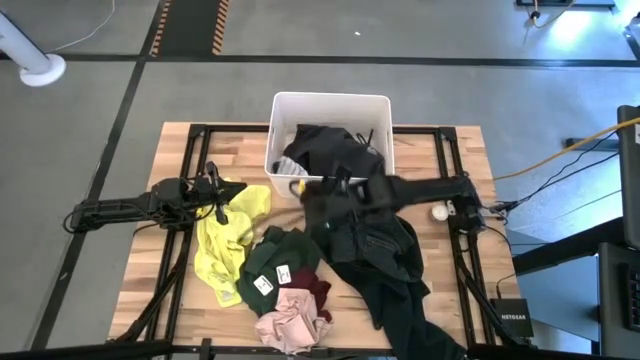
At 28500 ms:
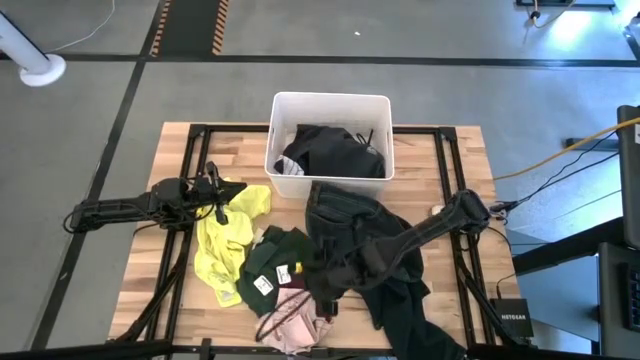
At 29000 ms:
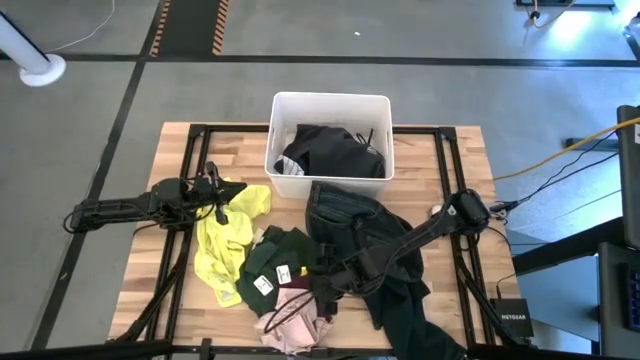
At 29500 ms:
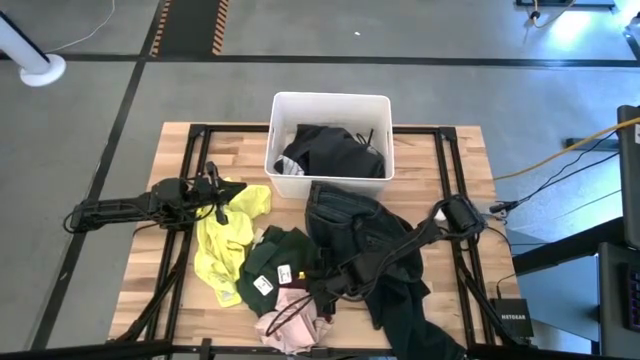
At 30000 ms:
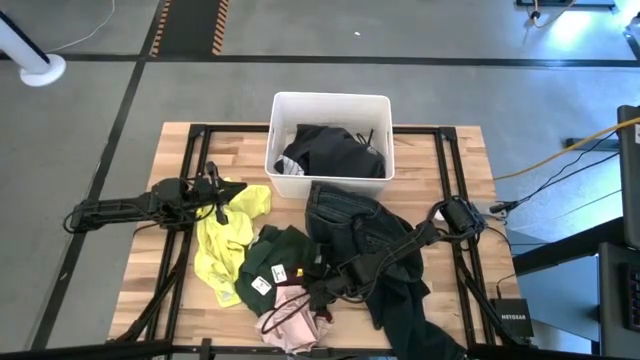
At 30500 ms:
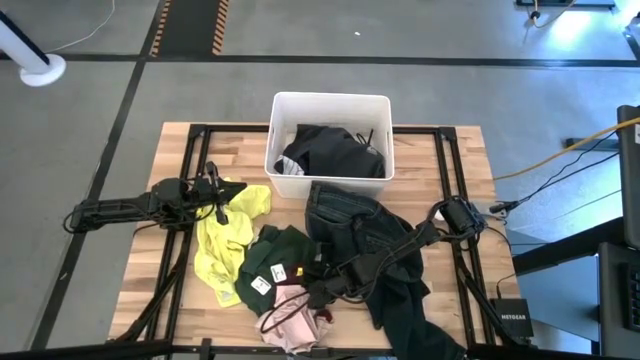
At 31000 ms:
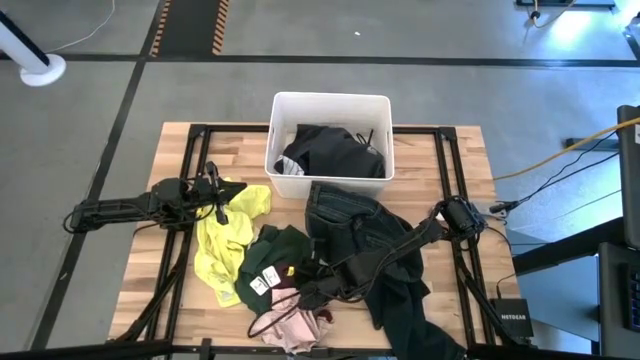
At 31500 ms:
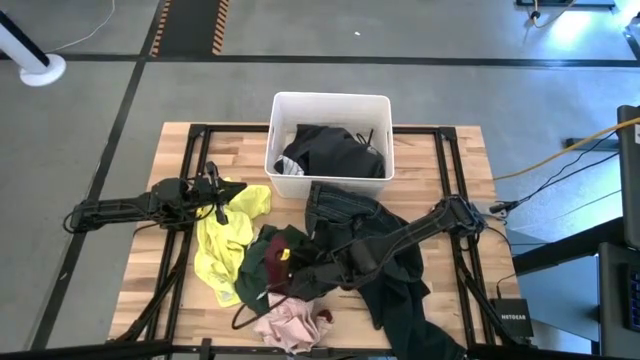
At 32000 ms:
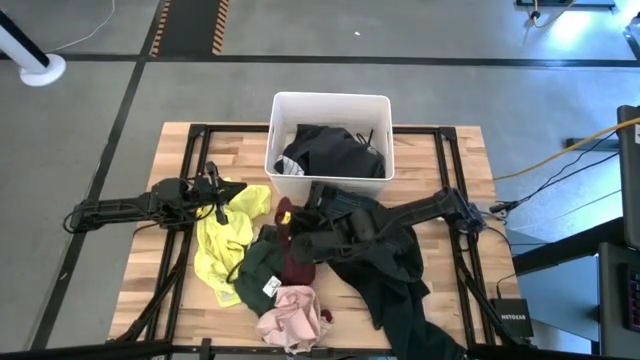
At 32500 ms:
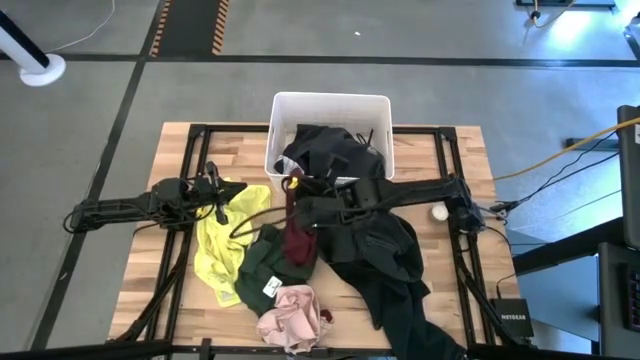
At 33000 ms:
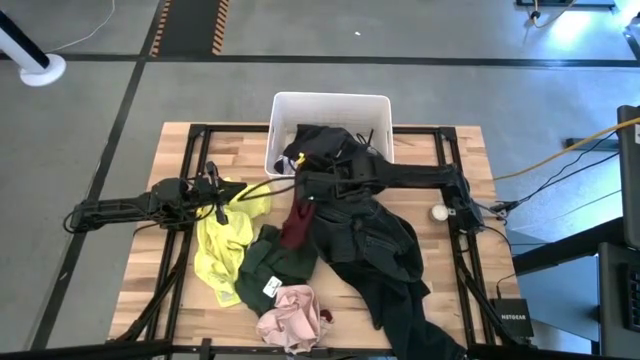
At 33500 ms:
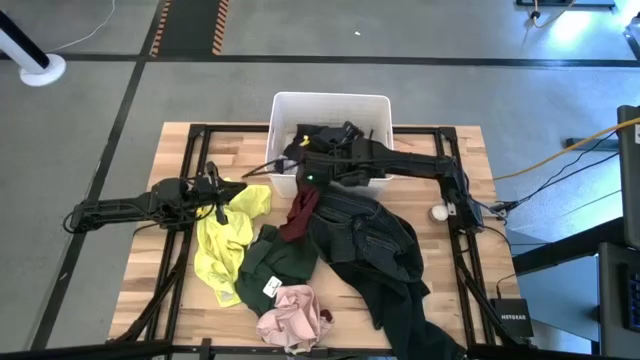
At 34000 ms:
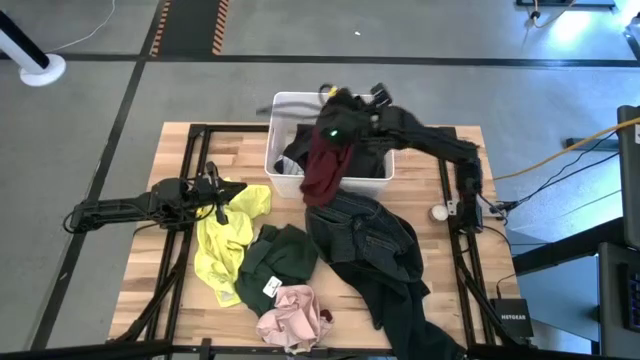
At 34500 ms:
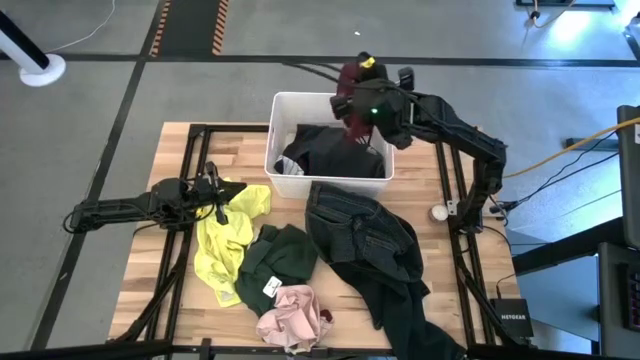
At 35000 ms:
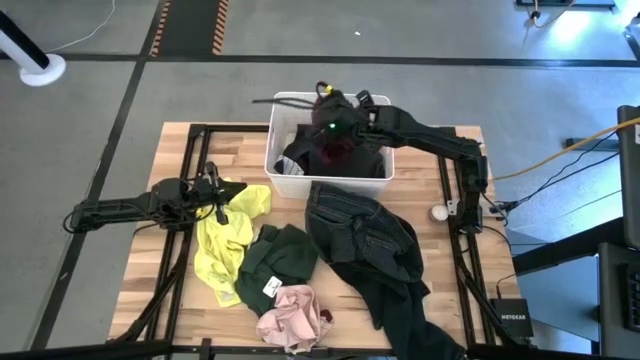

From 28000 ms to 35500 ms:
Task: Sort clothes
Put the red underwear into the white laundry organizer

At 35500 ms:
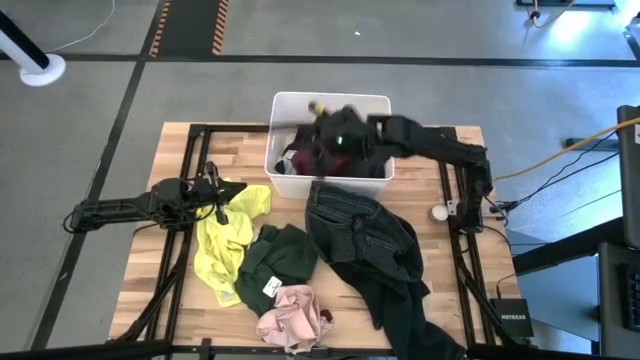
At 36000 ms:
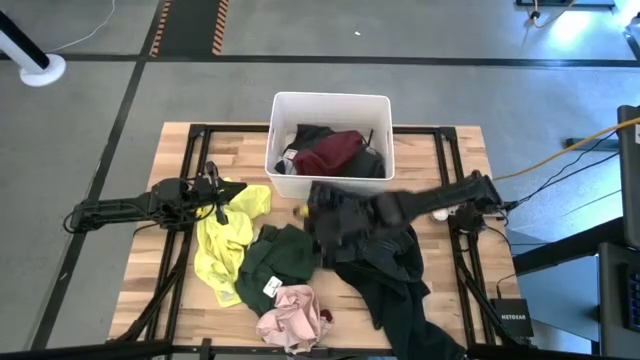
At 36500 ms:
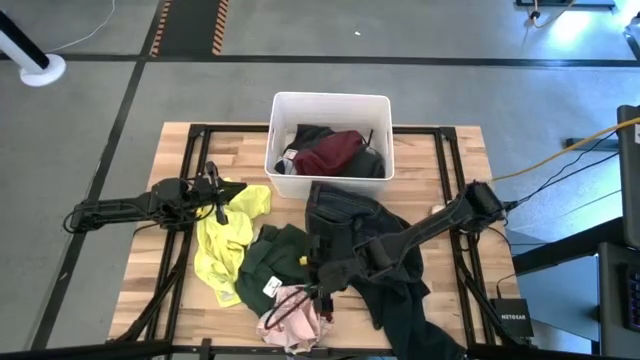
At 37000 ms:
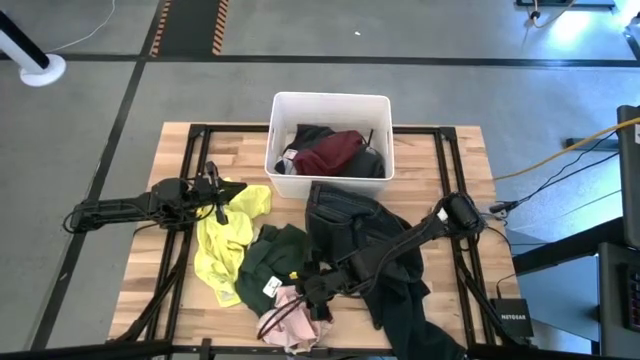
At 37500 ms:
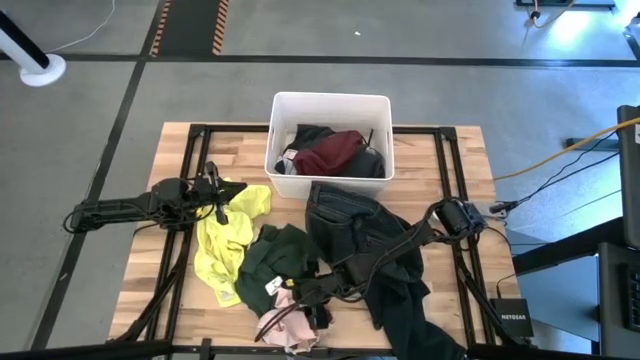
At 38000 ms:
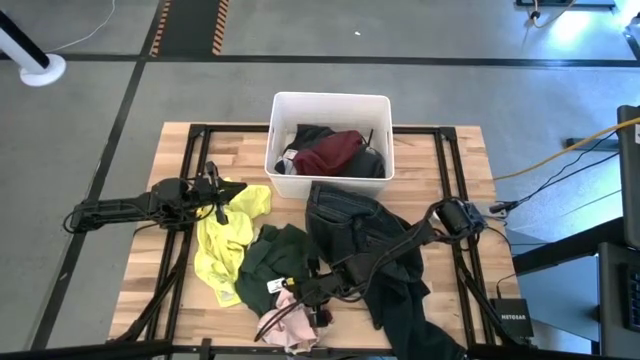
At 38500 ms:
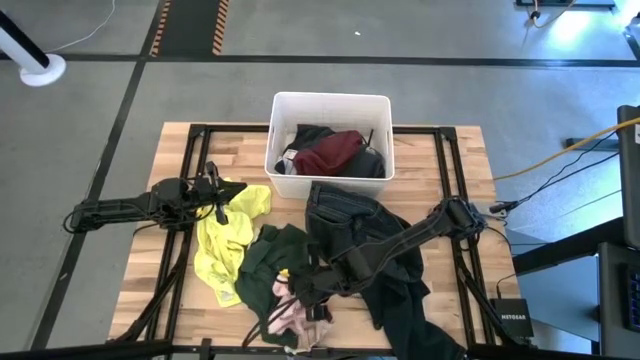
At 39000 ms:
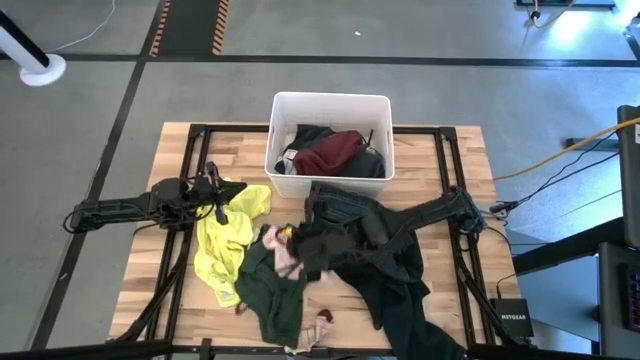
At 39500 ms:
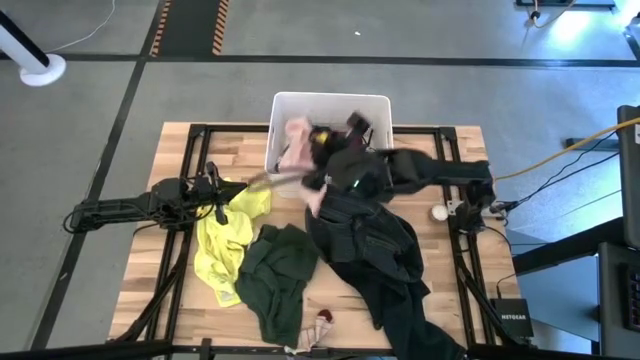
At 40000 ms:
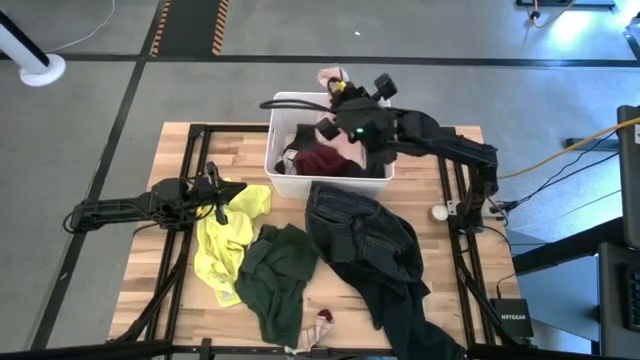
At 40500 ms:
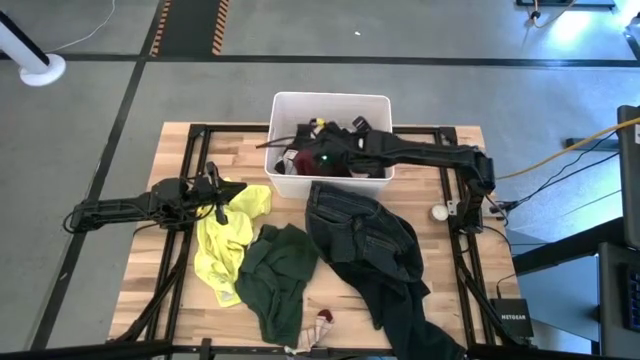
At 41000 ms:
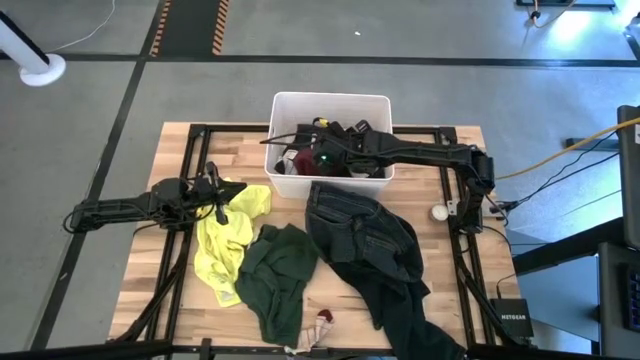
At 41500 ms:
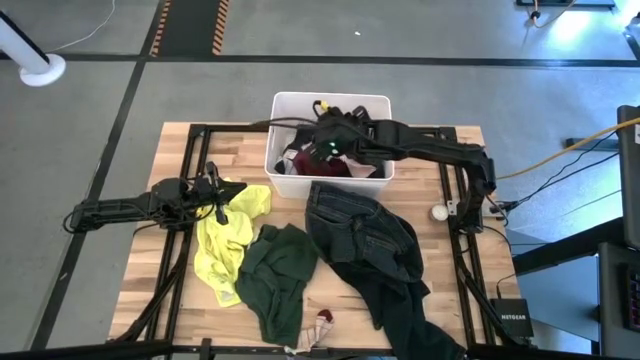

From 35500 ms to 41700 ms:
Put the pink underwear into the white laundry organizer

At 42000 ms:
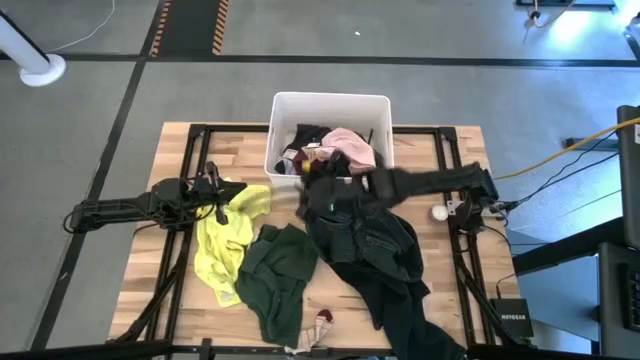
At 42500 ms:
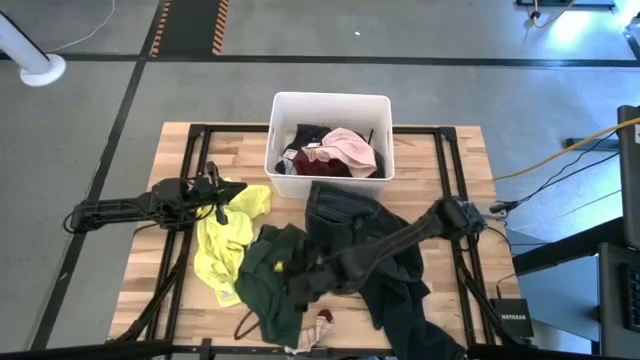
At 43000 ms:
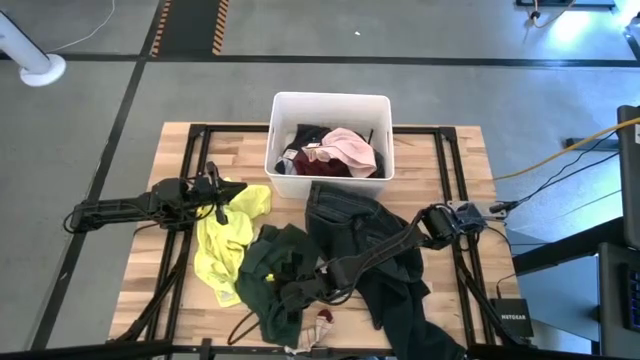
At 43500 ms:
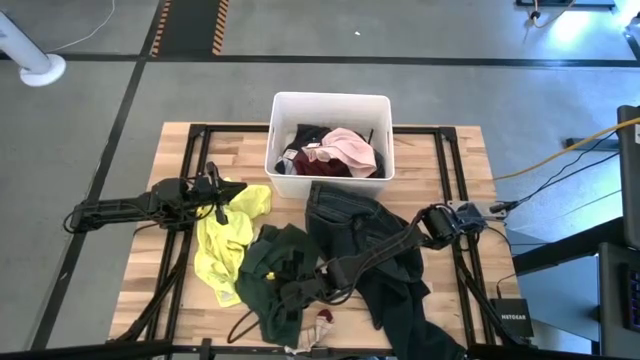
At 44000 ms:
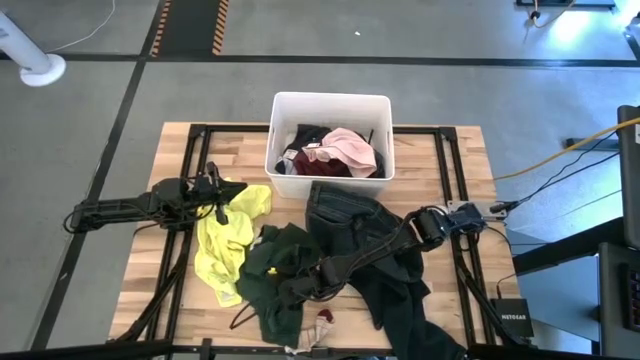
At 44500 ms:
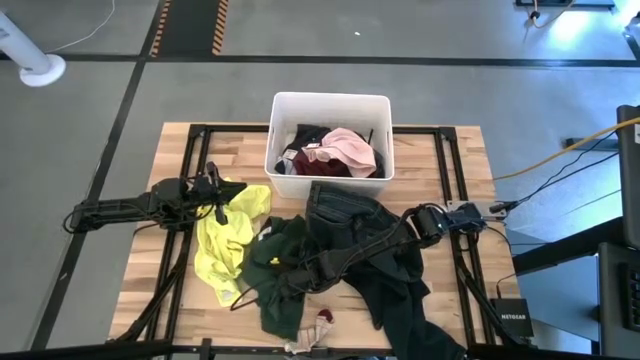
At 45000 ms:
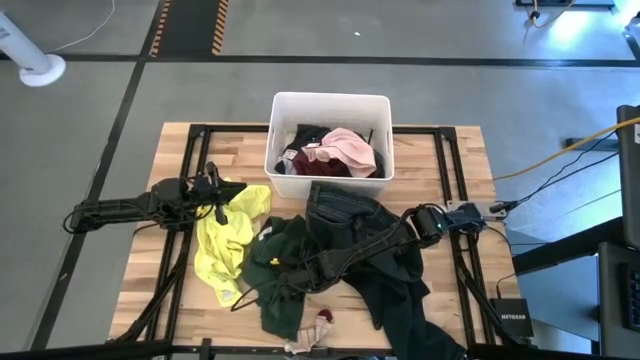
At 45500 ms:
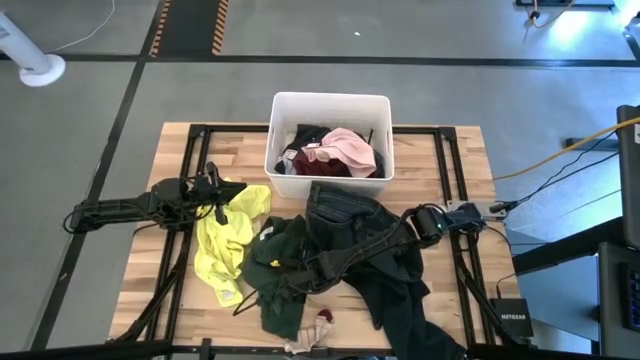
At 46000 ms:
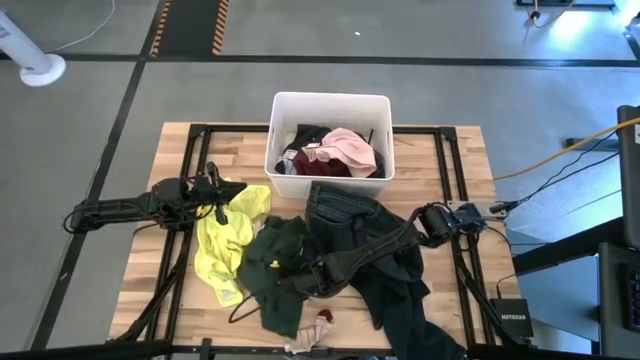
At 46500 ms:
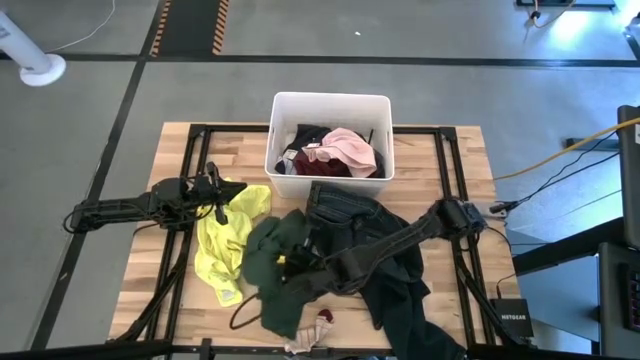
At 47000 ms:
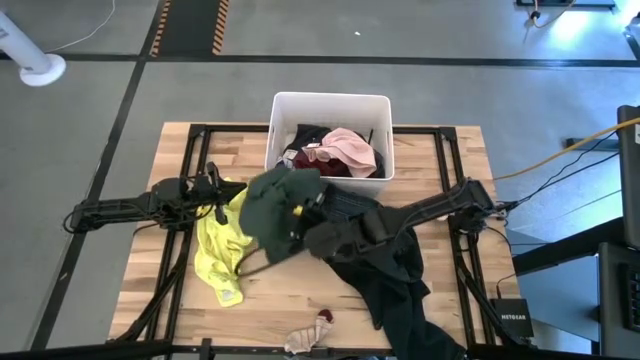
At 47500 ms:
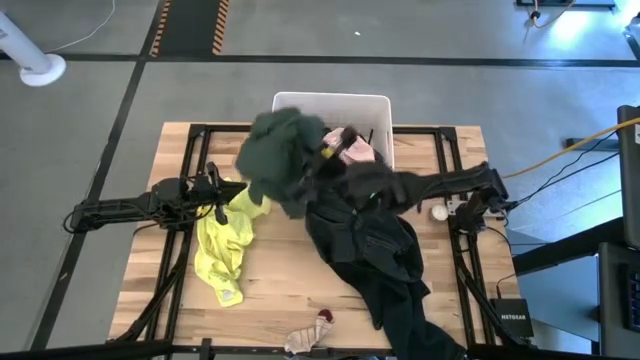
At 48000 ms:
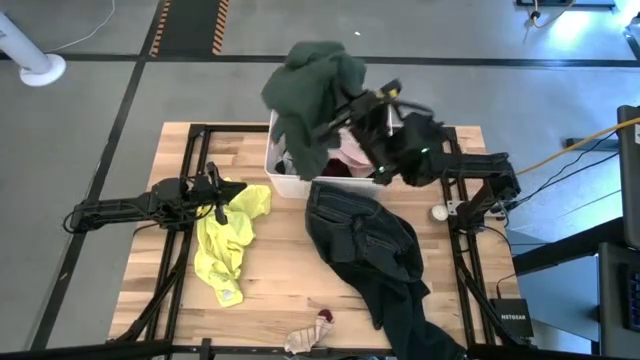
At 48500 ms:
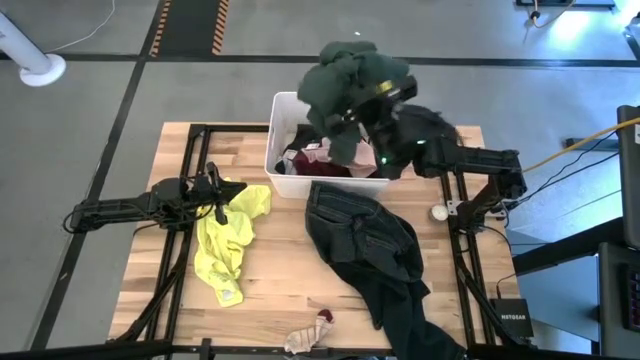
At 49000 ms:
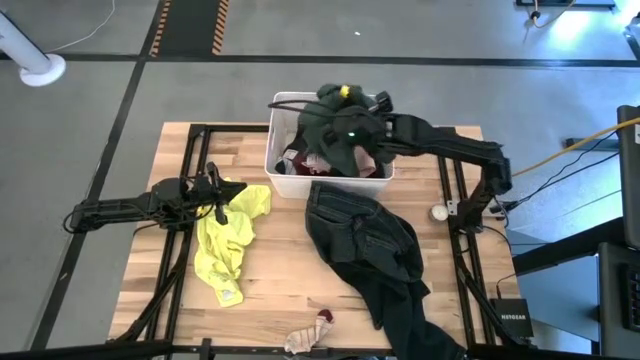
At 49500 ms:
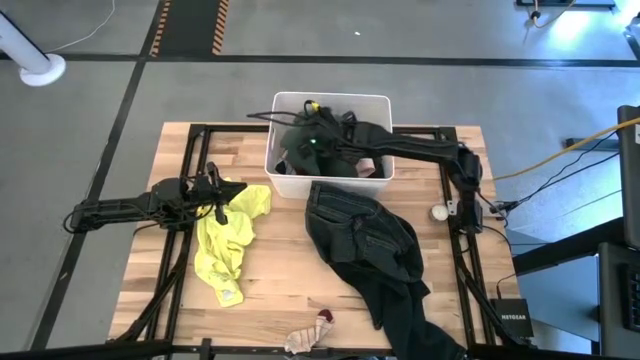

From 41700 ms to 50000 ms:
Put the green shirt into the white laundry organizer
